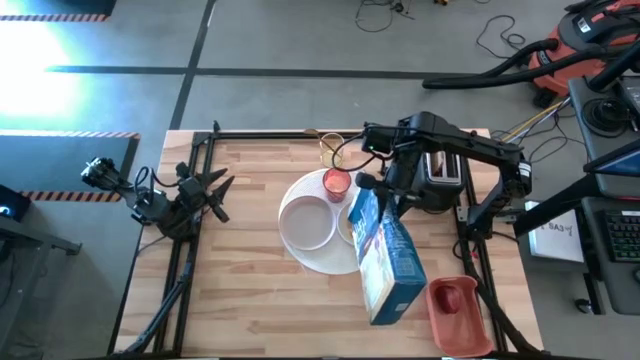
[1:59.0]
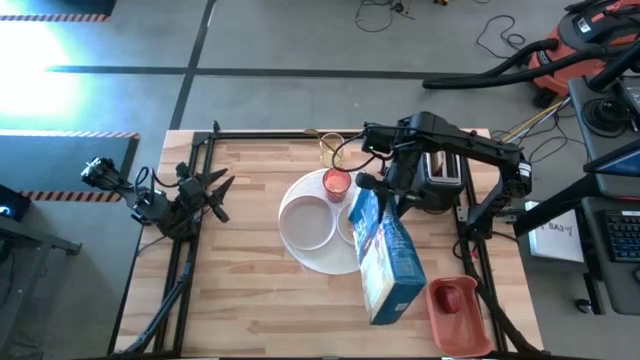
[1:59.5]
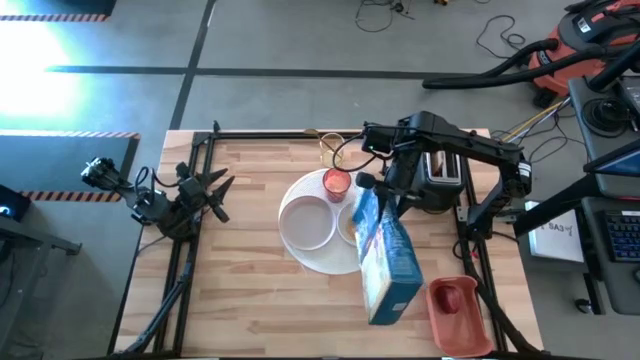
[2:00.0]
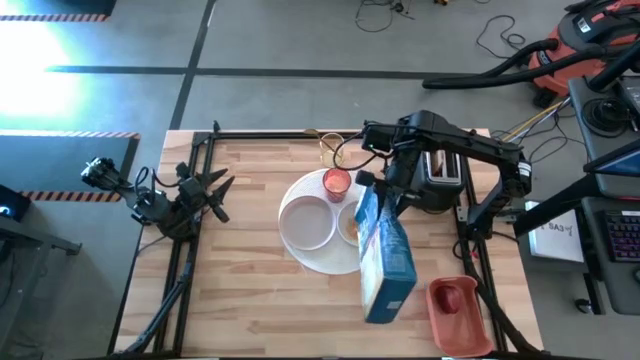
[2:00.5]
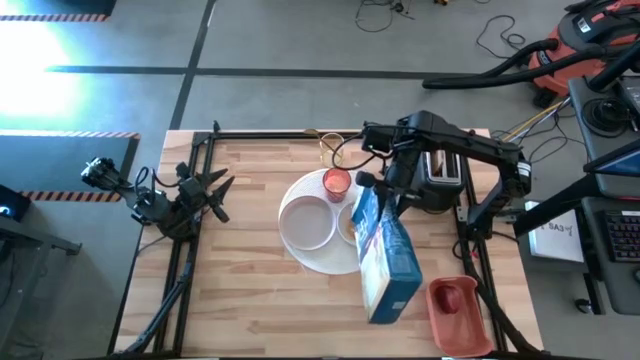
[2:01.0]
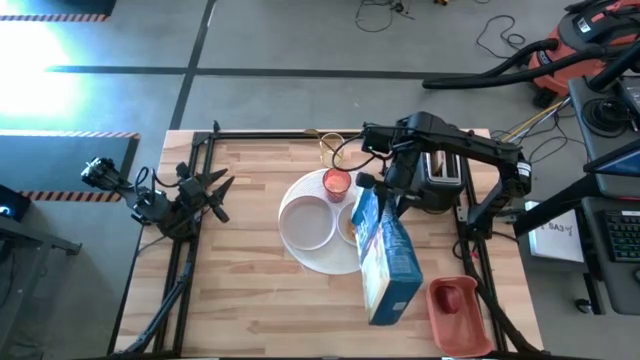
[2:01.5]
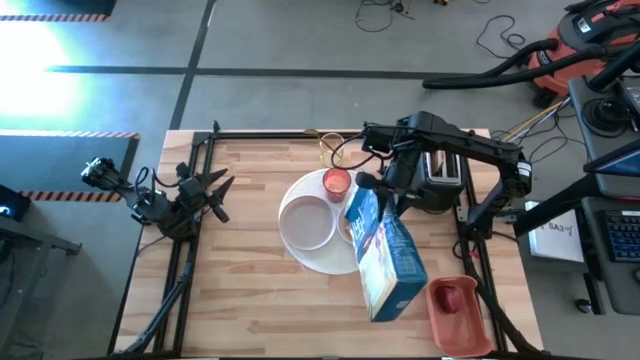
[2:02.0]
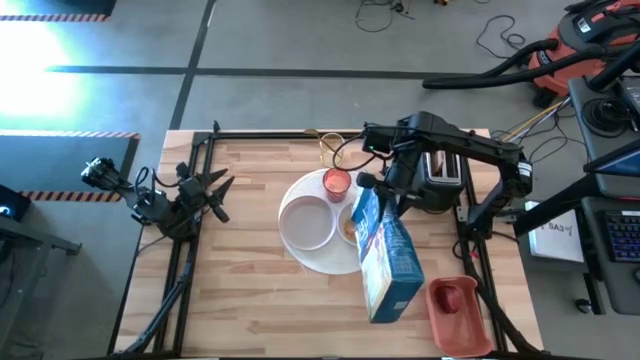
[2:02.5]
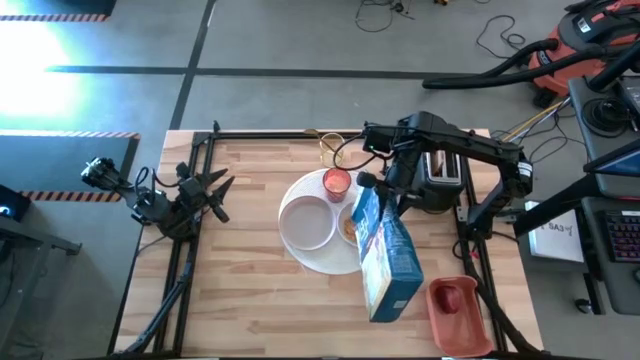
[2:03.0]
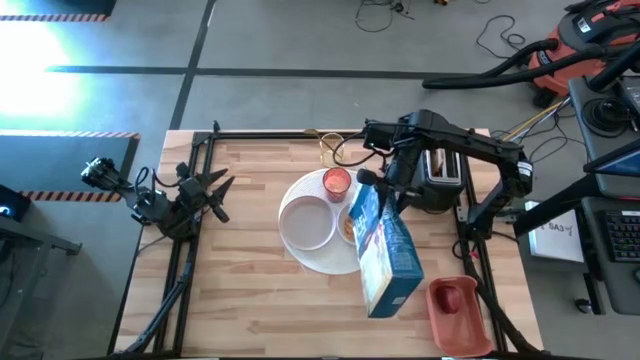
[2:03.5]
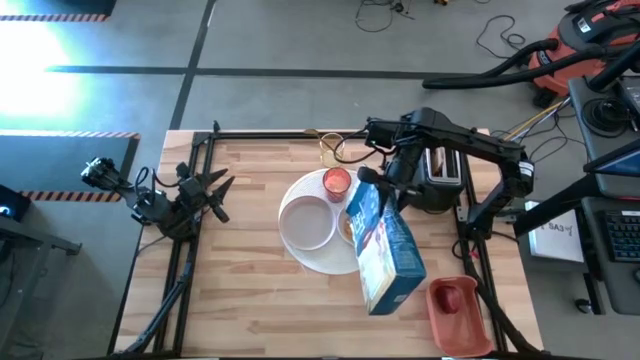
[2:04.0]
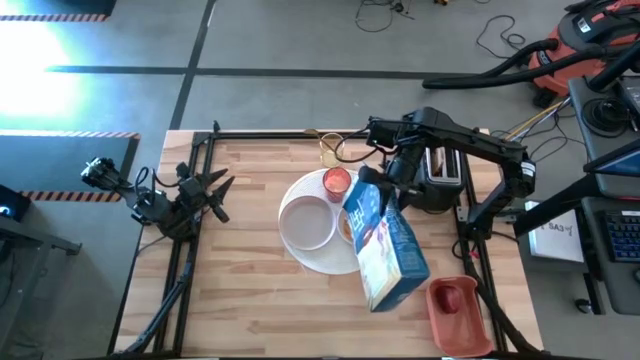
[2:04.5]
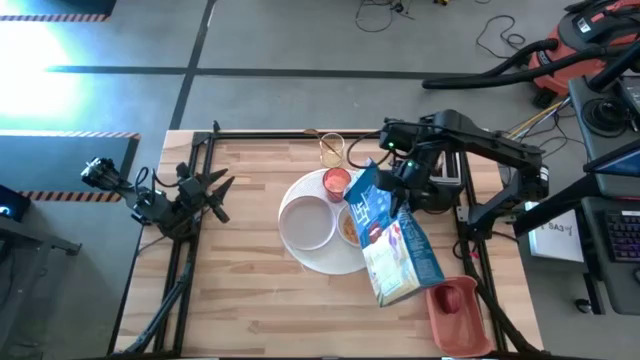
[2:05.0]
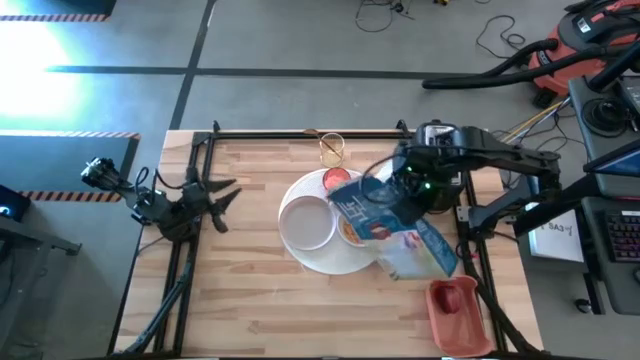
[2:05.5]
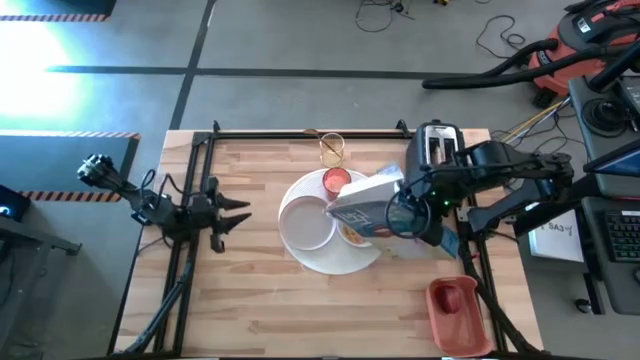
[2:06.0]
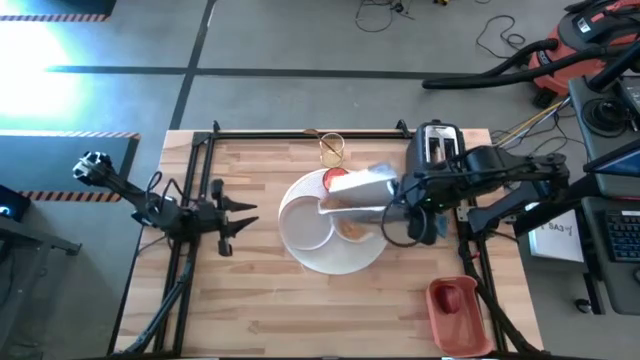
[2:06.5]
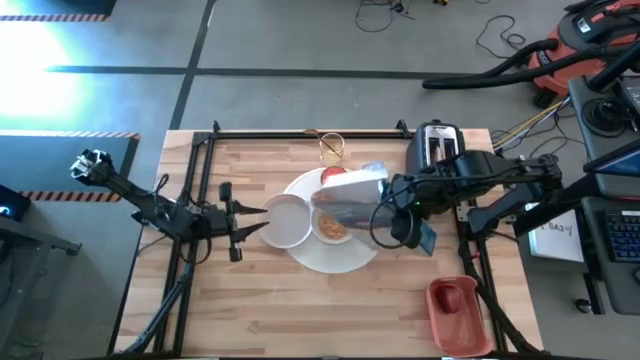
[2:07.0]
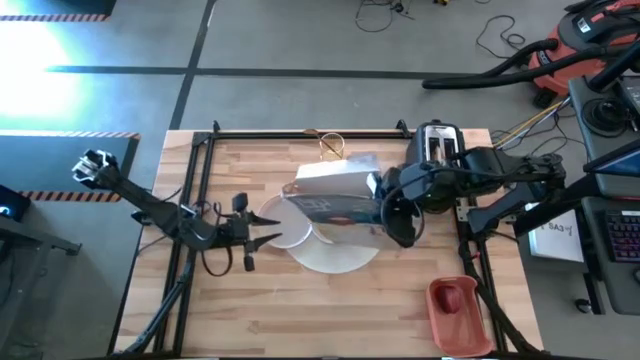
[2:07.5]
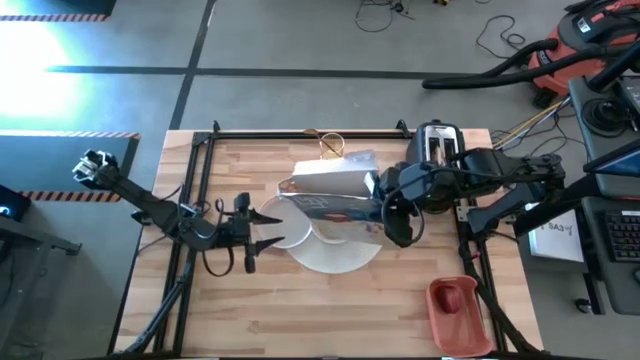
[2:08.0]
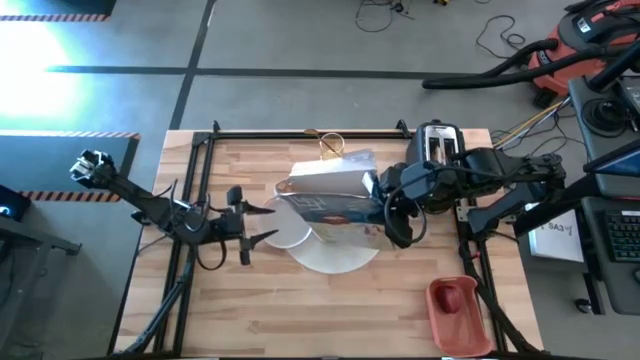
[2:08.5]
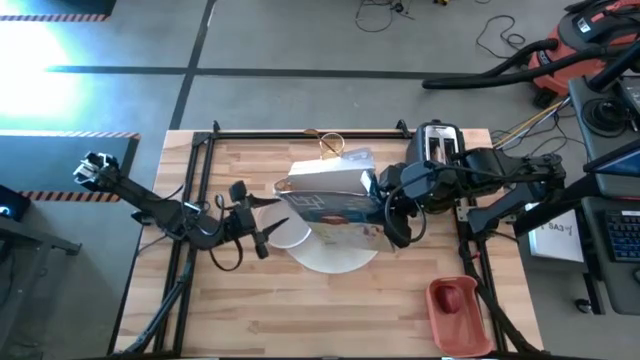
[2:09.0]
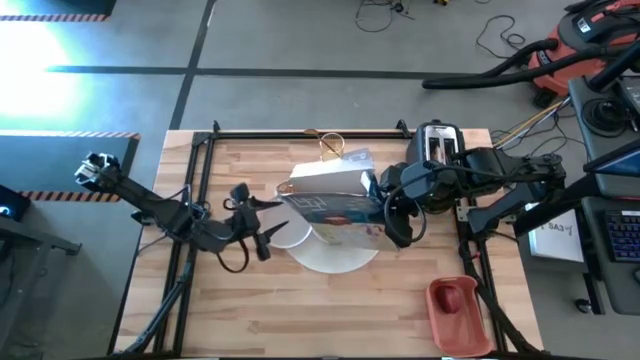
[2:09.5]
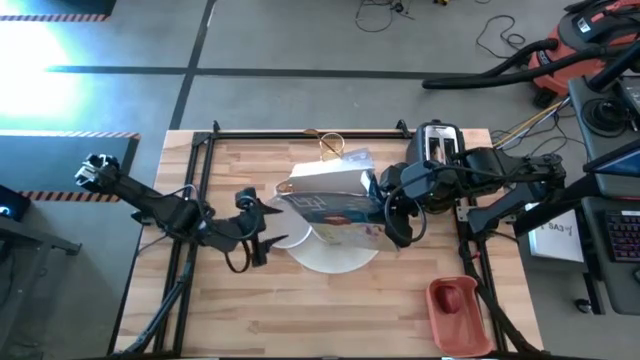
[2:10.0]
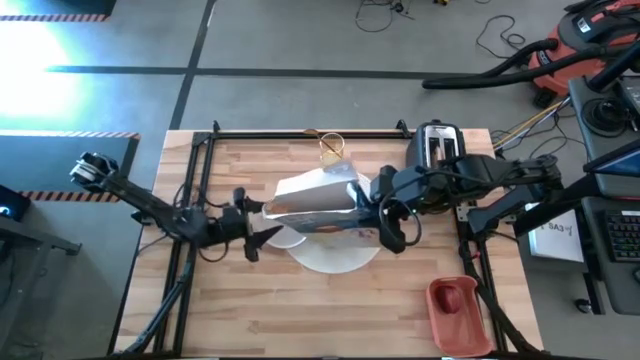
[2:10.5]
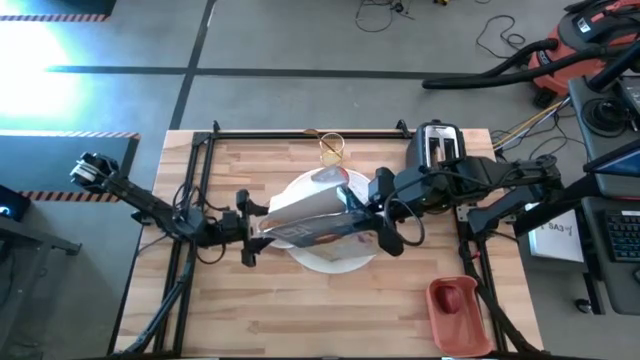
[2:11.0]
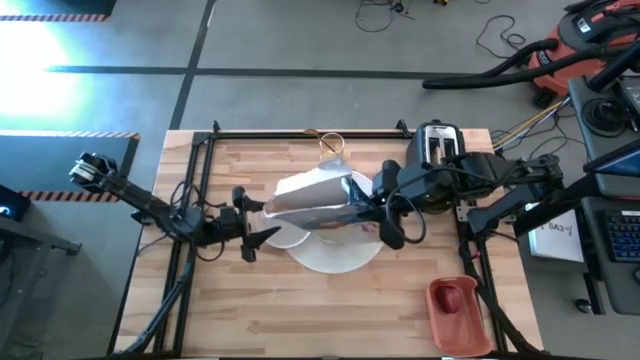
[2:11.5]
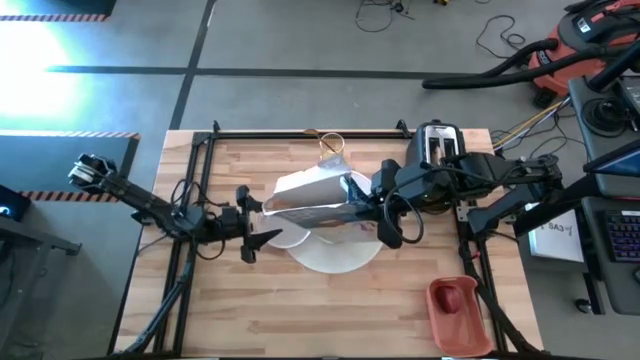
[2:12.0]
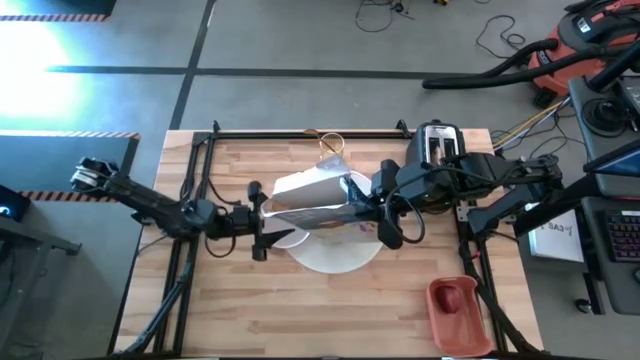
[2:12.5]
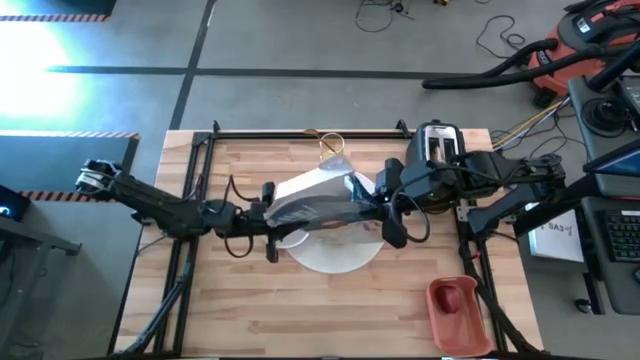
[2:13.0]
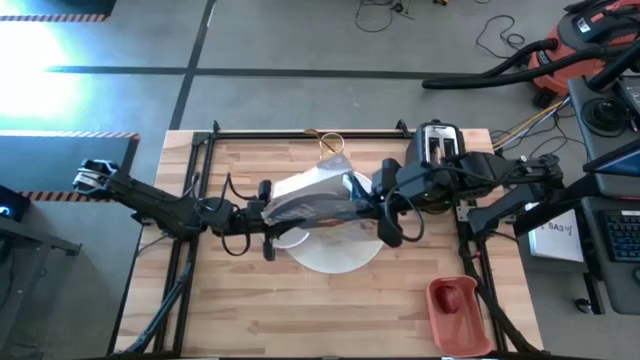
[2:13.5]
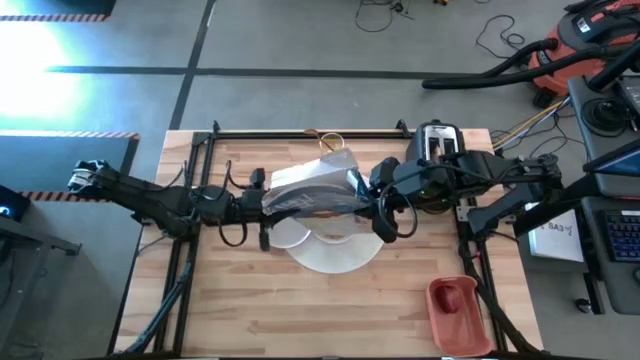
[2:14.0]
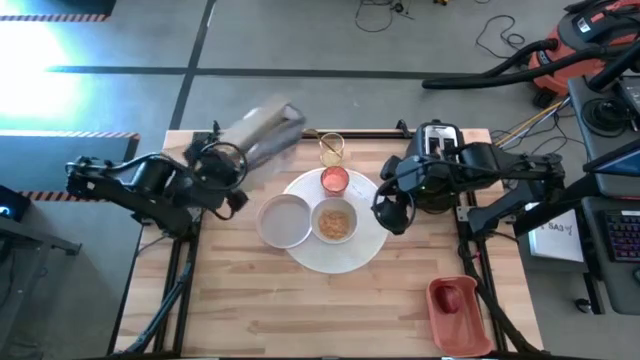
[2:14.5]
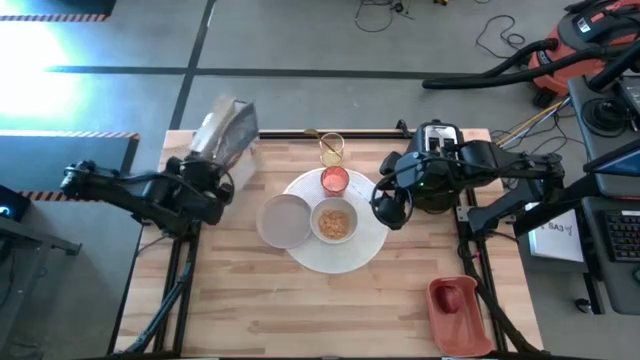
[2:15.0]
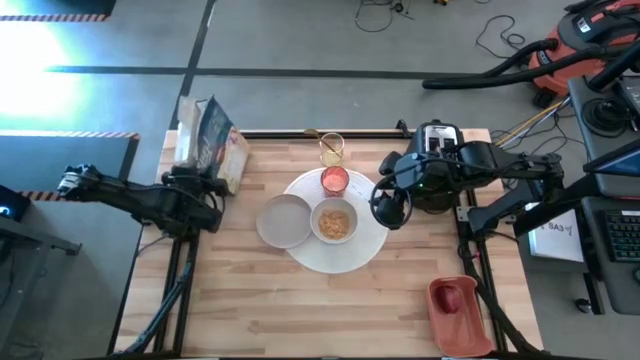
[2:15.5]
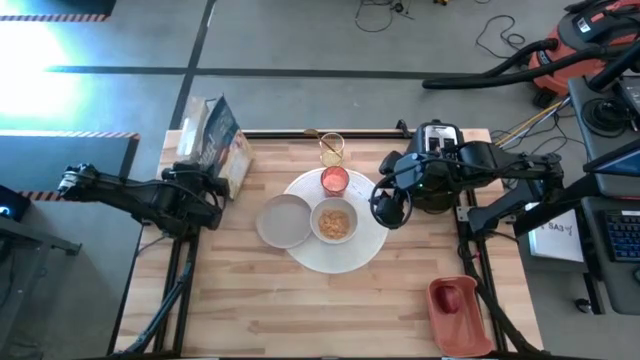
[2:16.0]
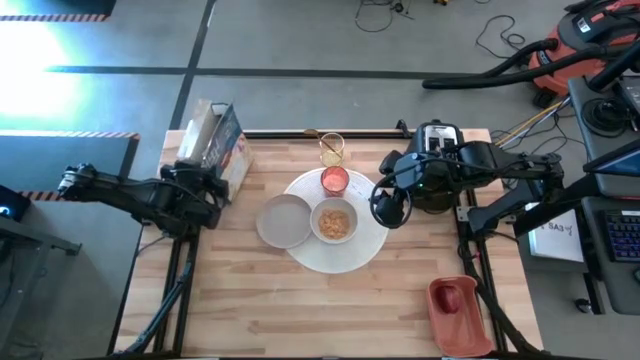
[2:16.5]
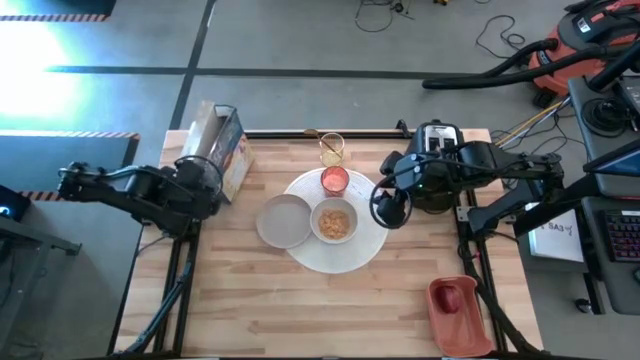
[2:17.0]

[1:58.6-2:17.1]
Task: Arrange a breakfast setting
Pour the cereal from the cereal box into the white bowl

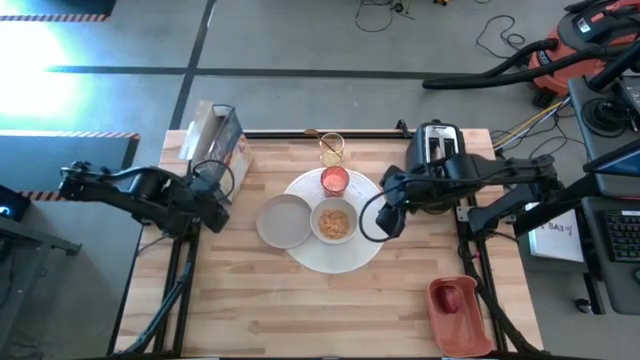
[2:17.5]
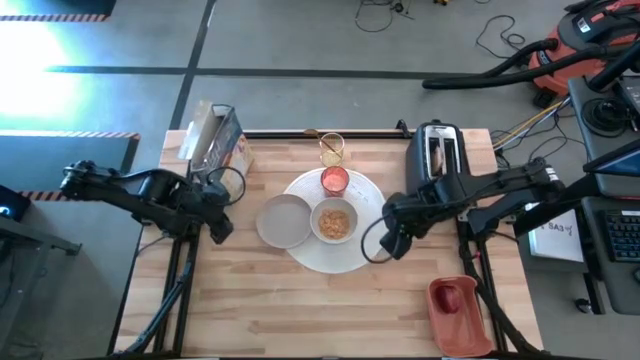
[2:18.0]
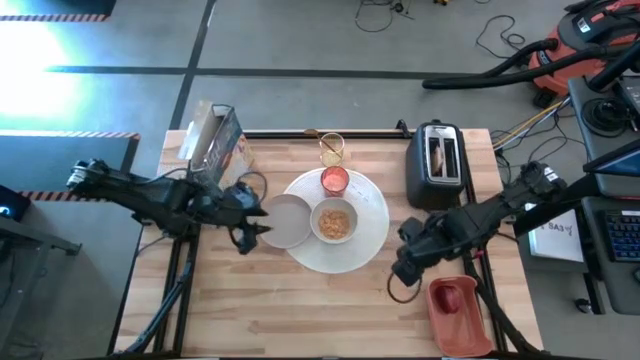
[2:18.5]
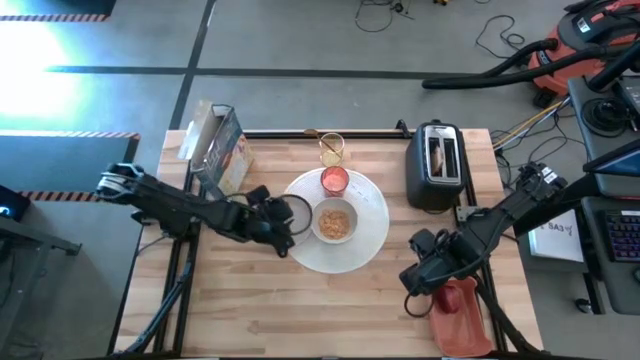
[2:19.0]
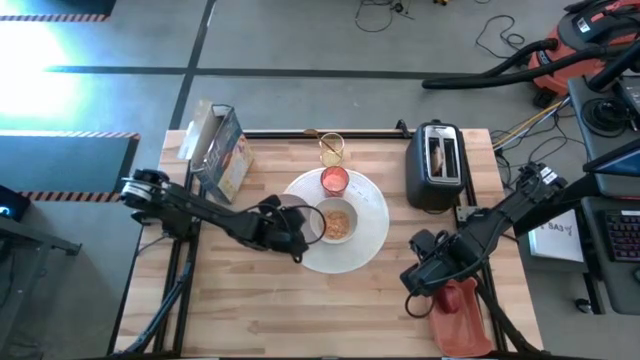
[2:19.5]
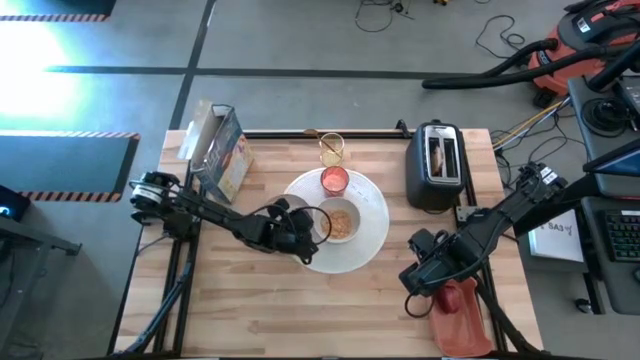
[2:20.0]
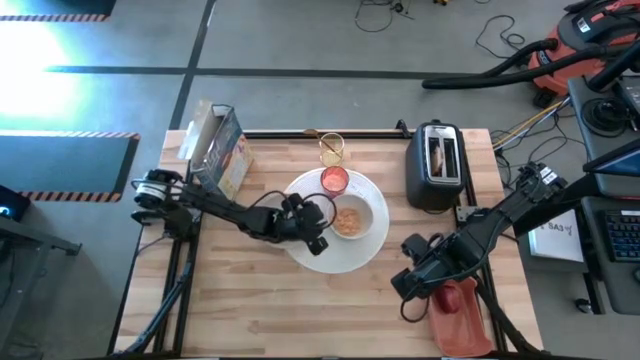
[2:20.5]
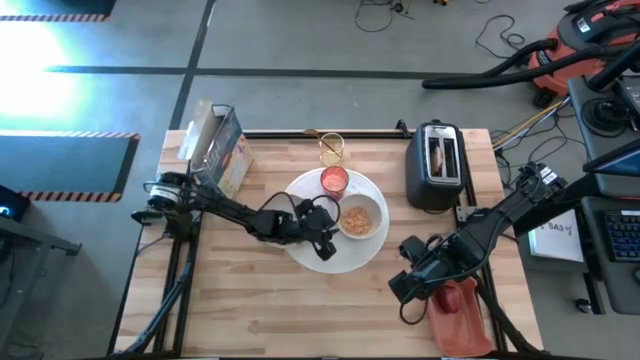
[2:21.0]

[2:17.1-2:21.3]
Adjust the bowl
